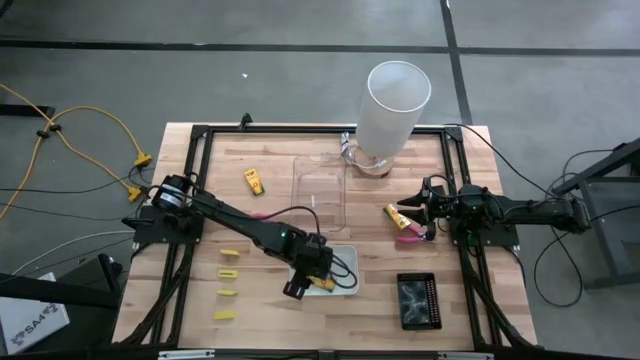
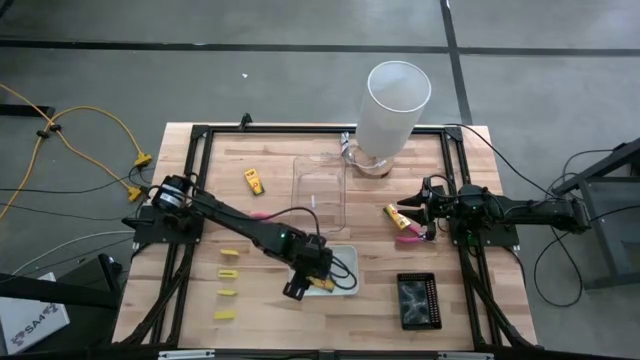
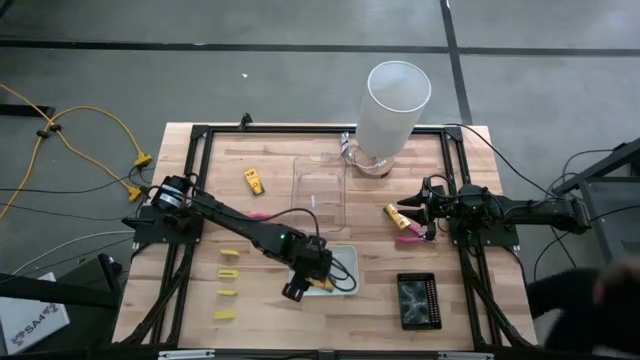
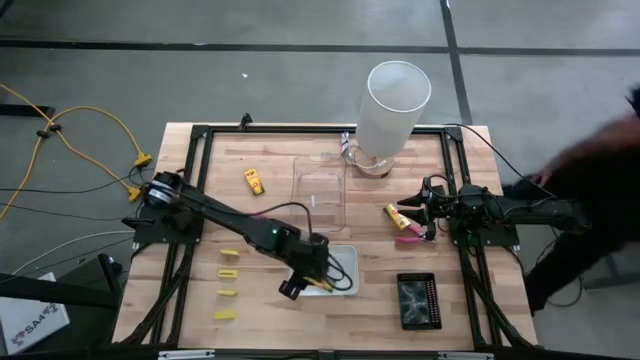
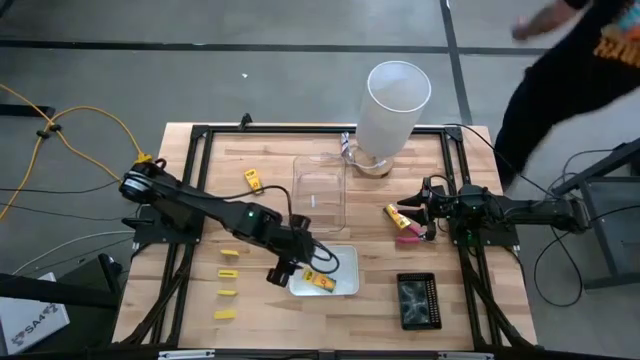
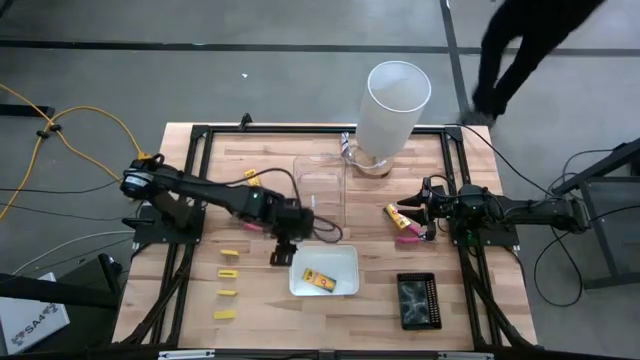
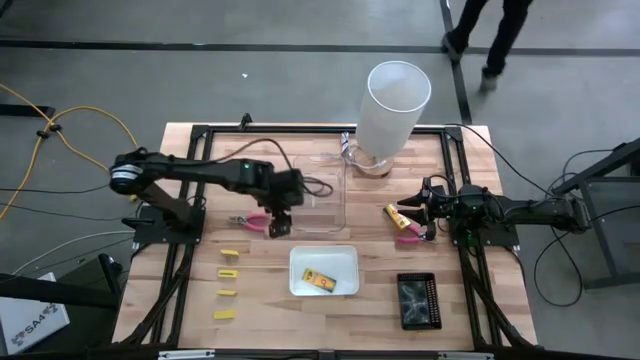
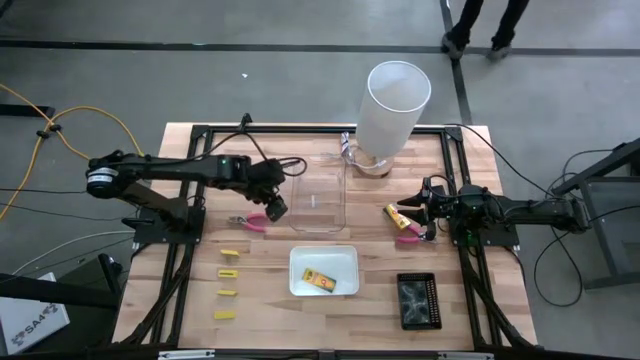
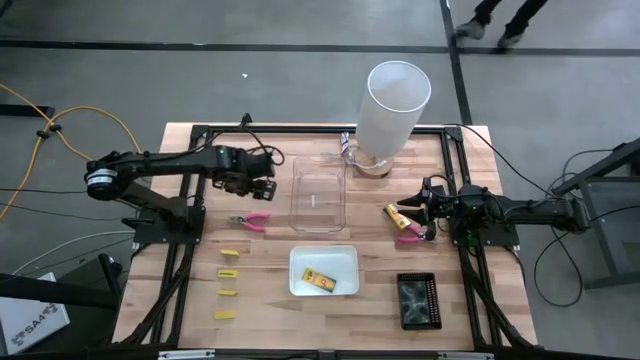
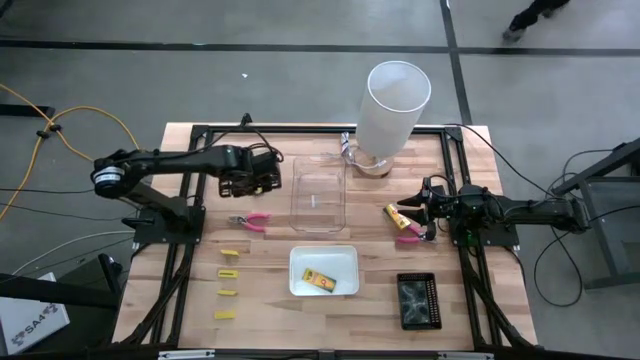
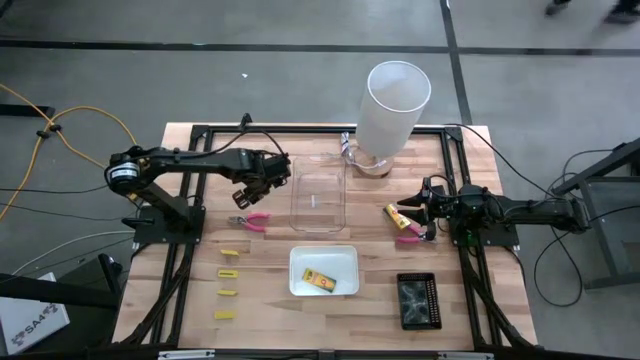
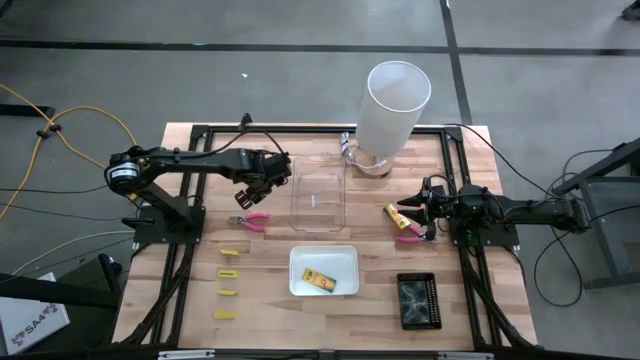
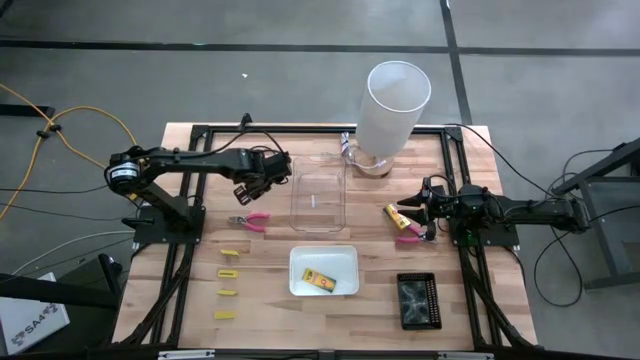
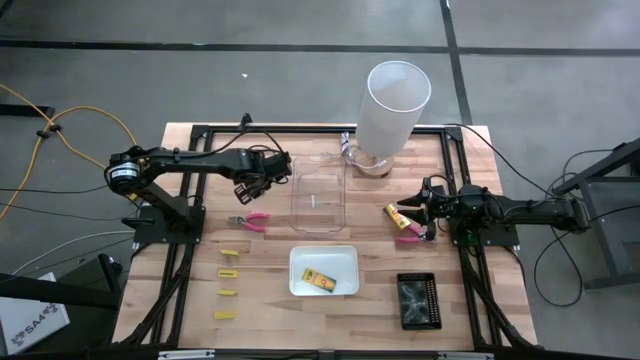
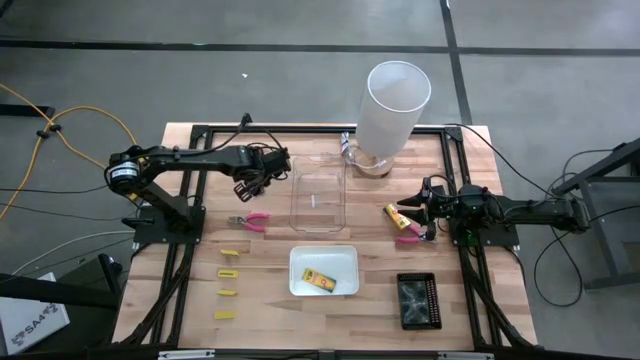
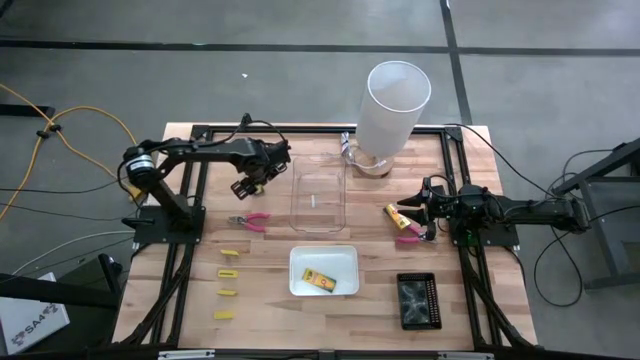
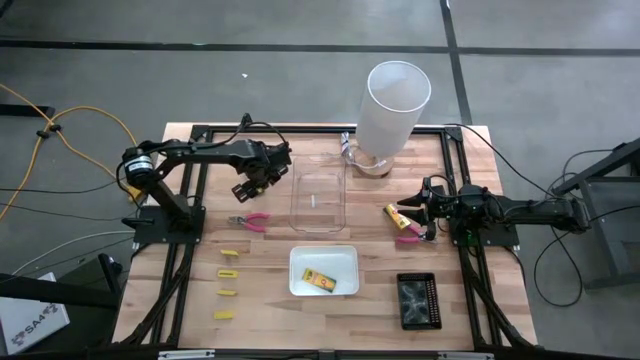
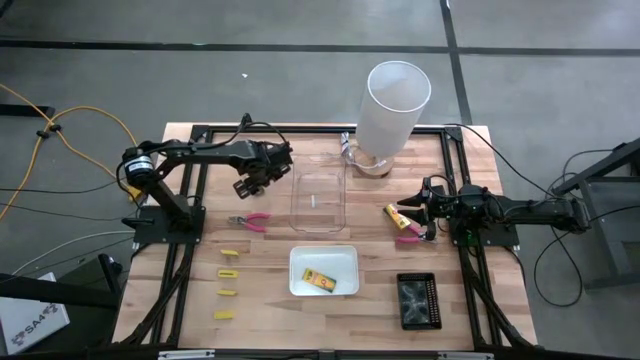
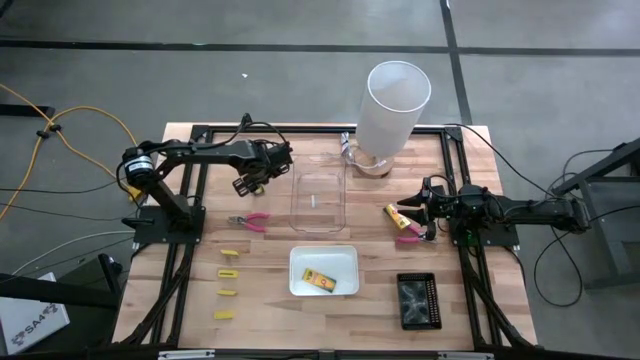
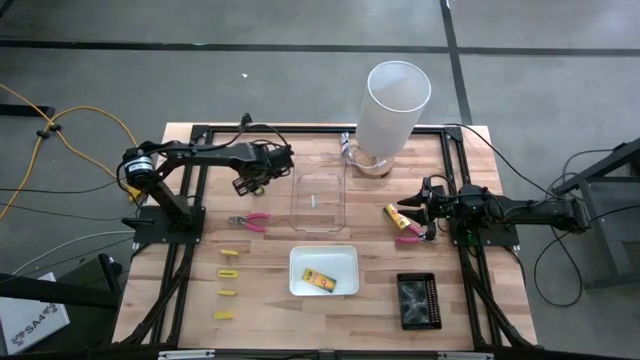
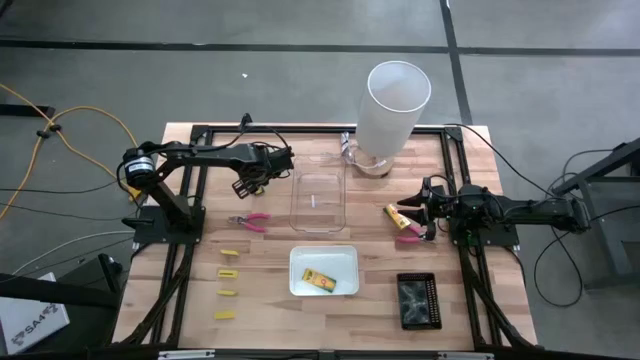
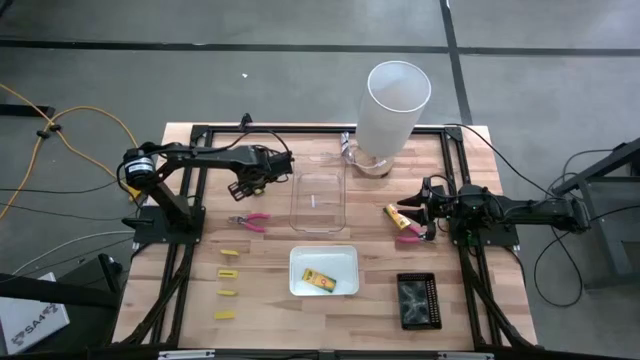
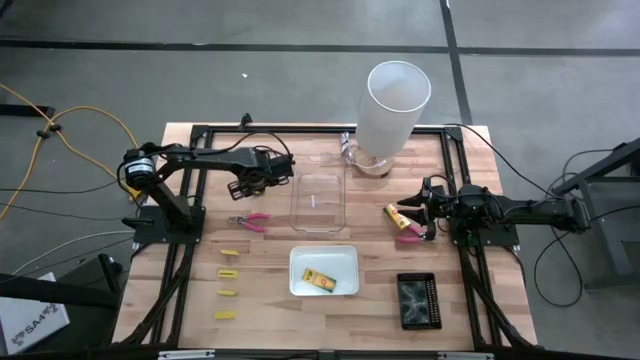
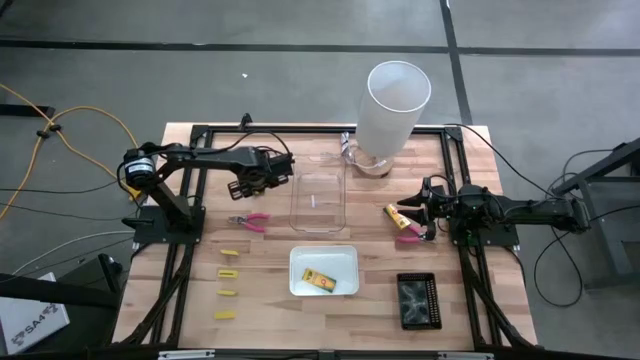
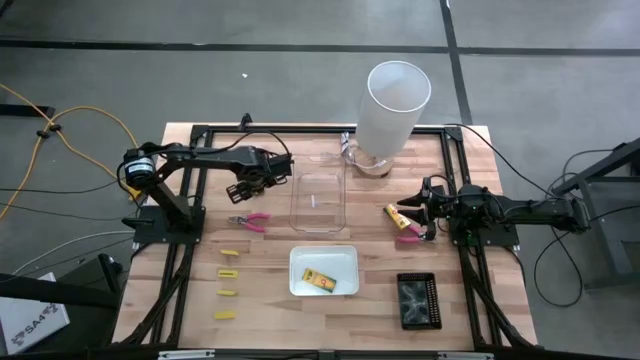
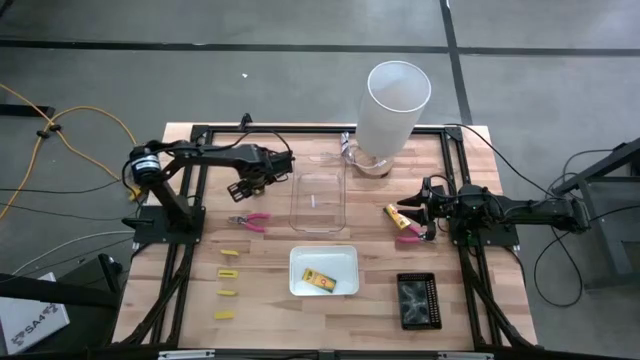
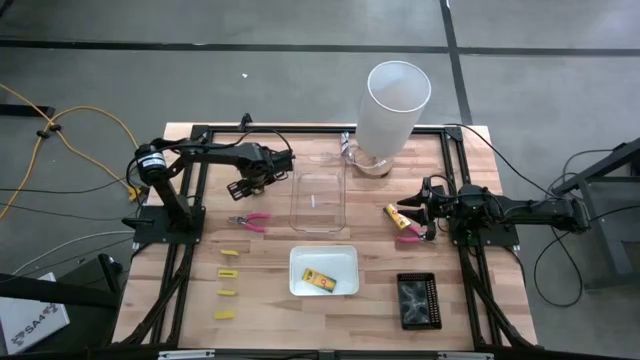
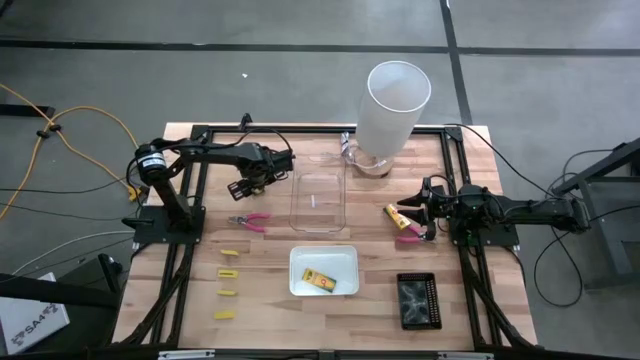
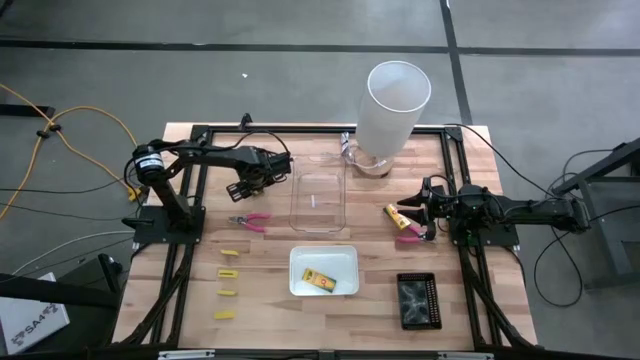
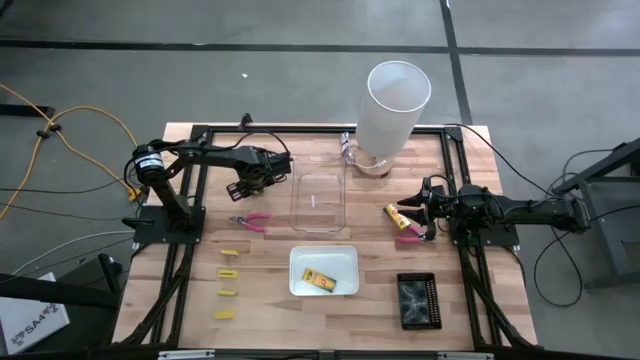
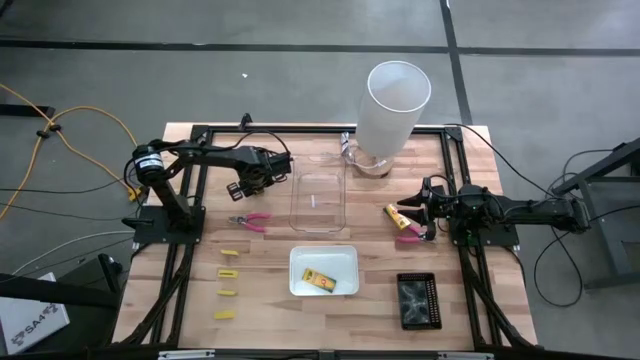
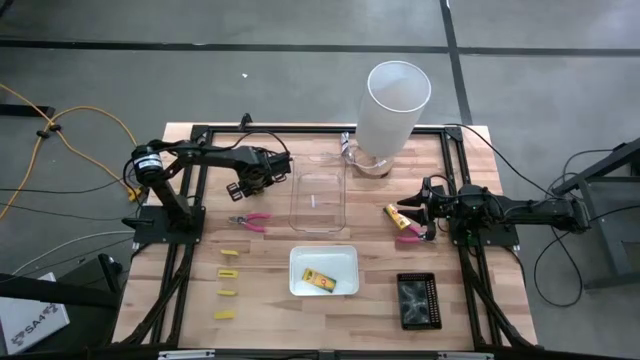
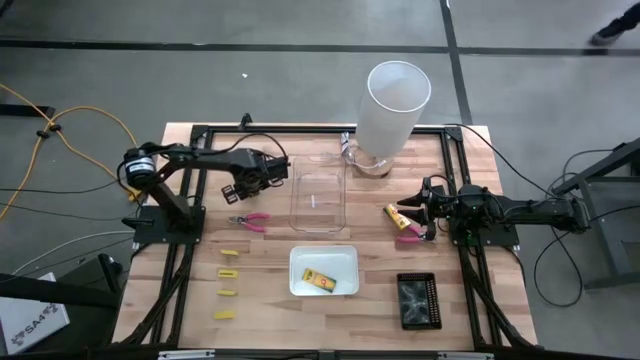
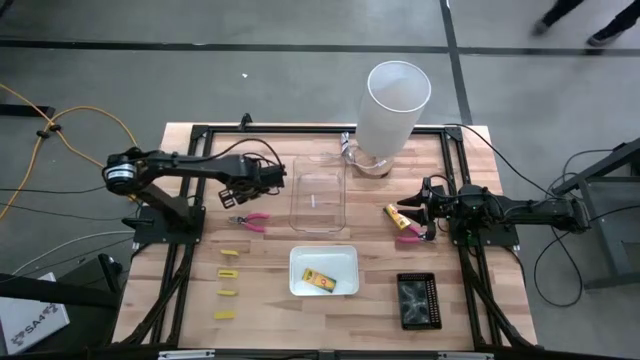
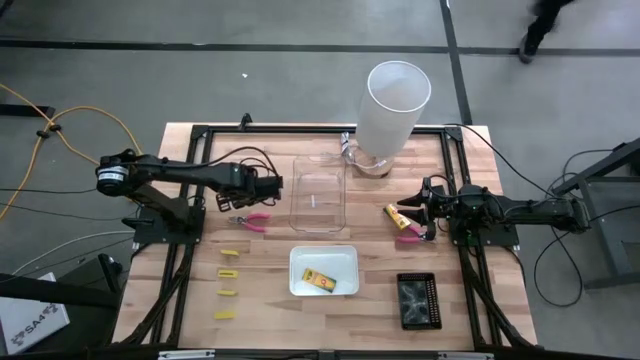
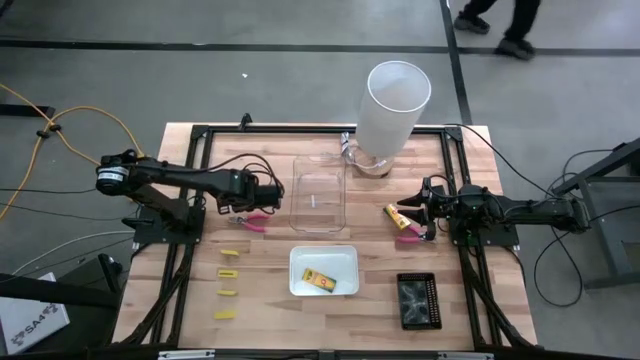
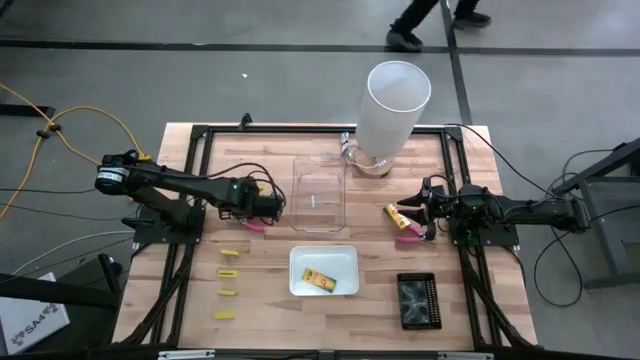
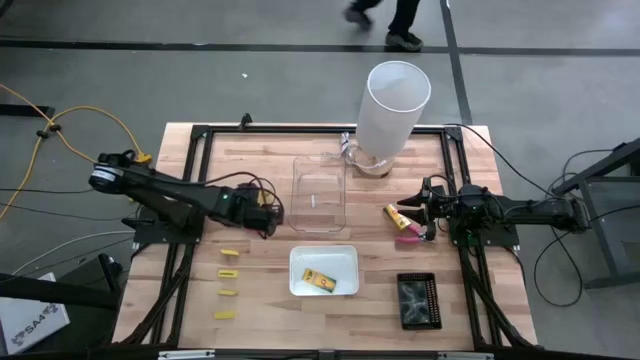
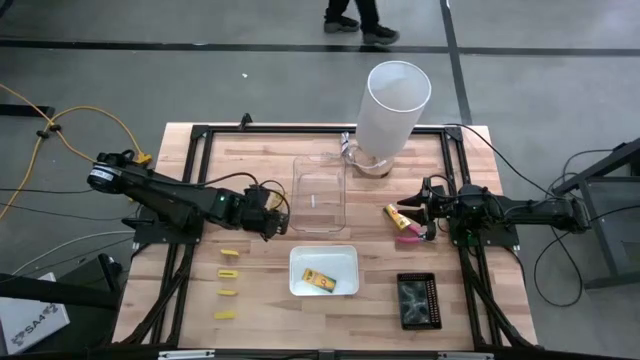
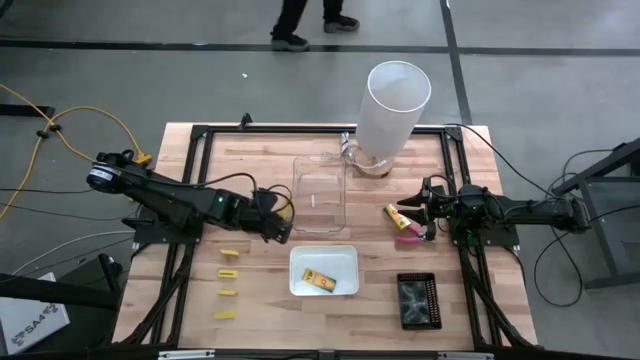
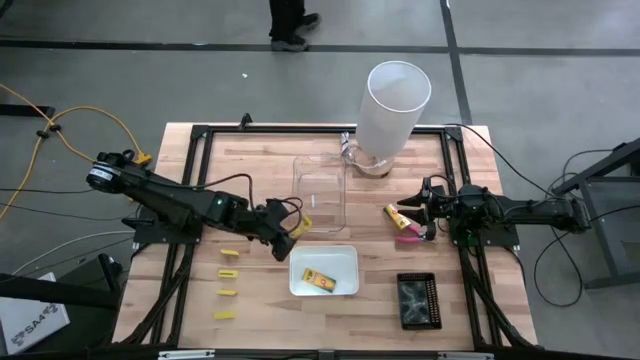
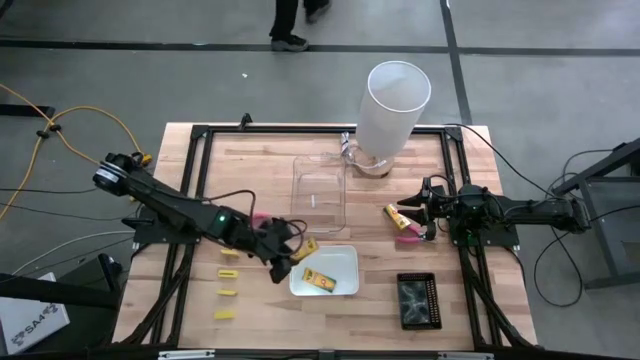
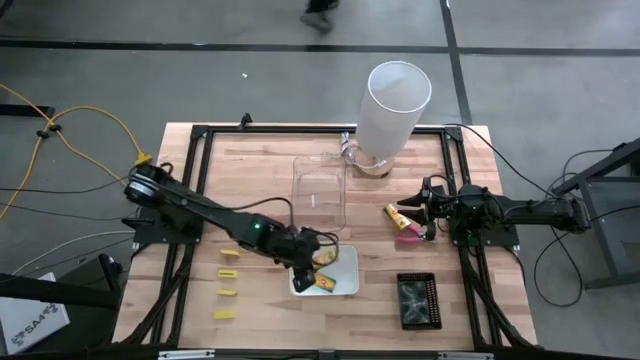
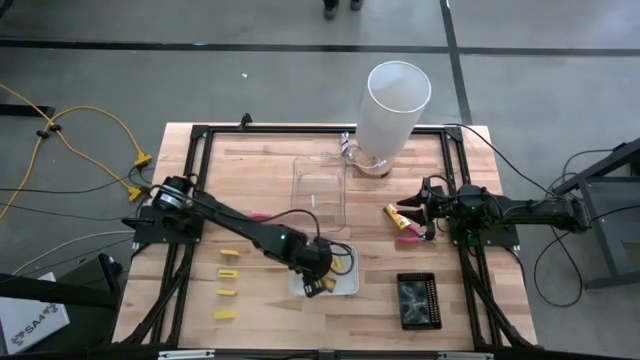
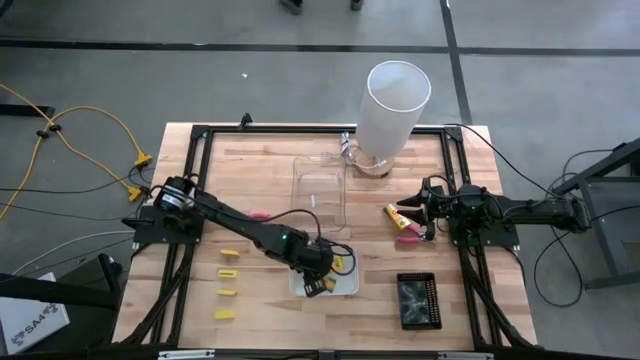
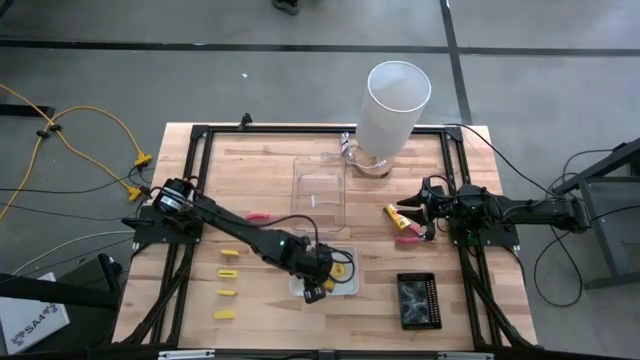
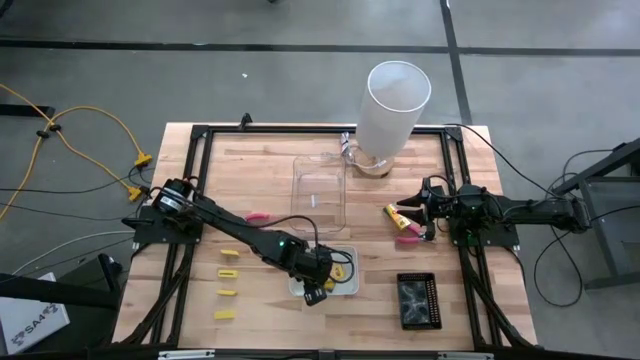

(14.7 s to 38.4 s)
Task: Pick & Place School Supplies
Put the yellow crayon box into the white bin
